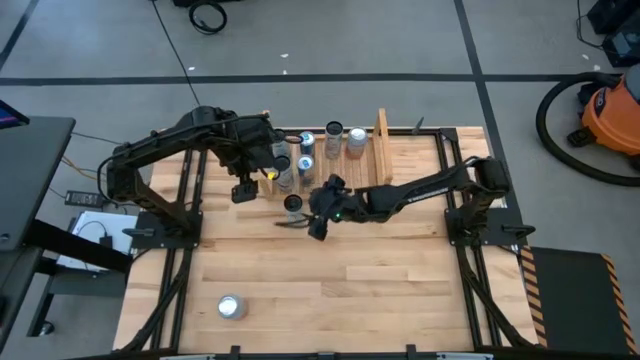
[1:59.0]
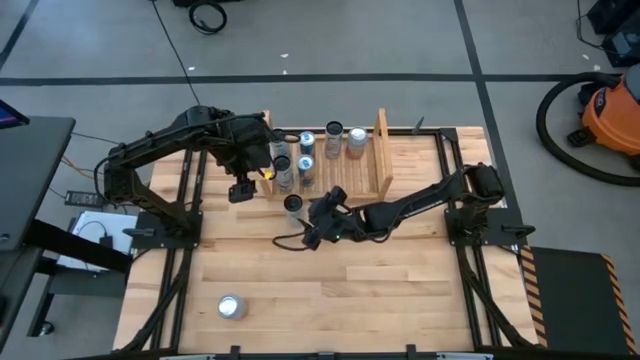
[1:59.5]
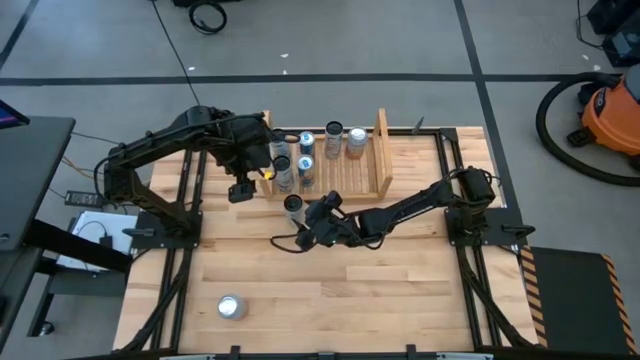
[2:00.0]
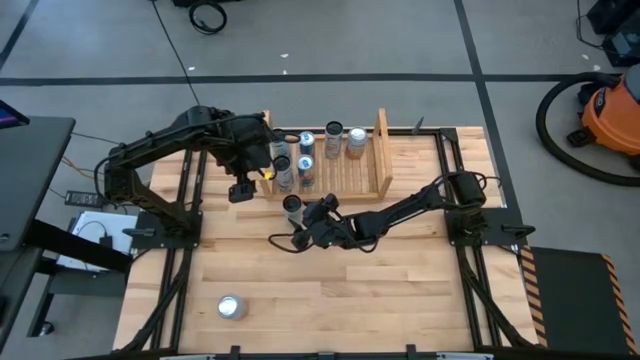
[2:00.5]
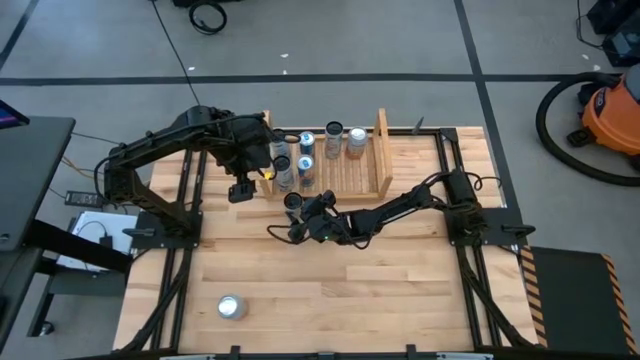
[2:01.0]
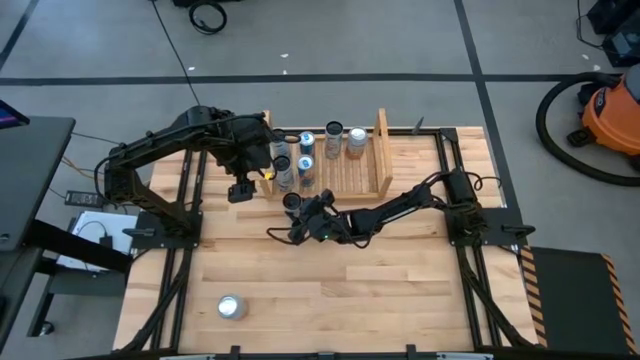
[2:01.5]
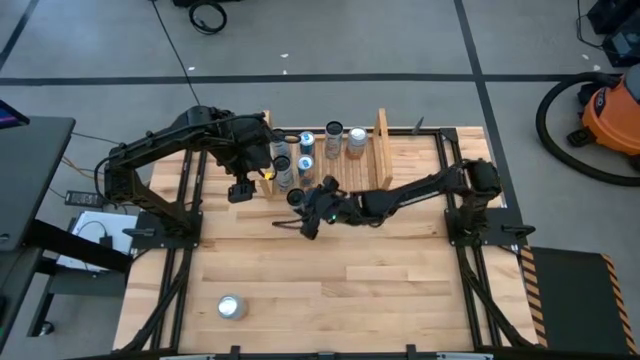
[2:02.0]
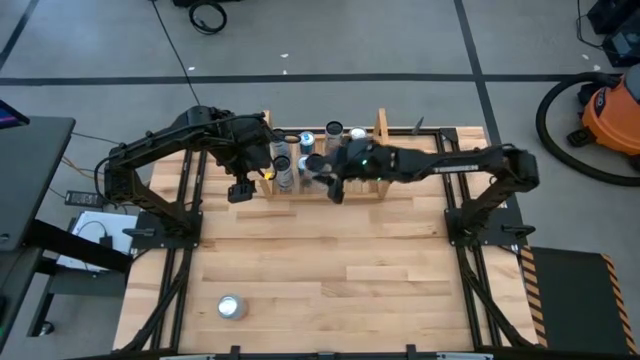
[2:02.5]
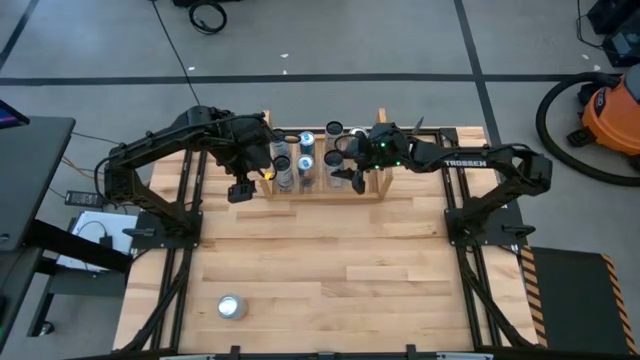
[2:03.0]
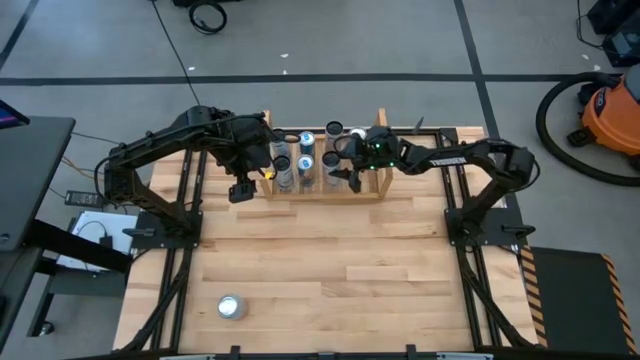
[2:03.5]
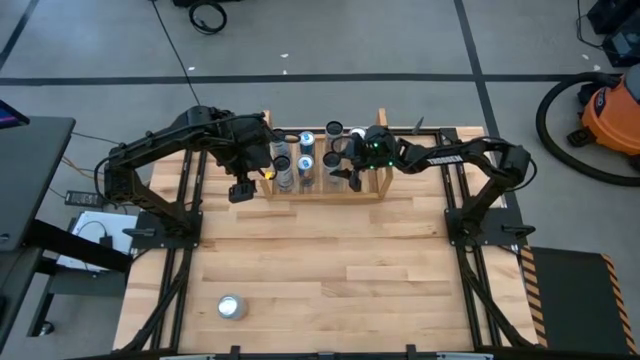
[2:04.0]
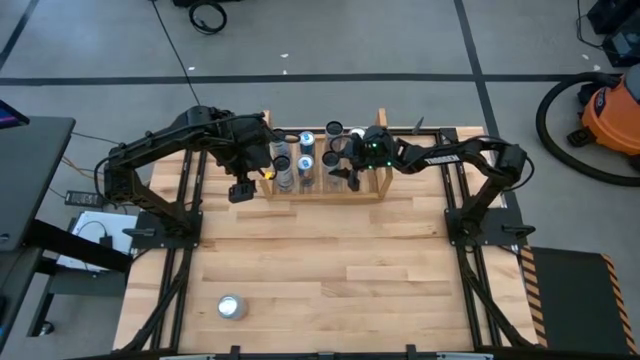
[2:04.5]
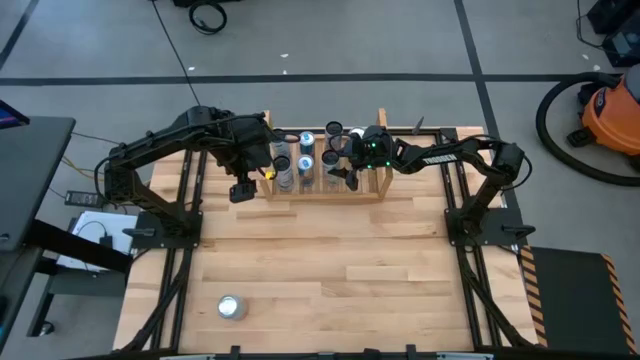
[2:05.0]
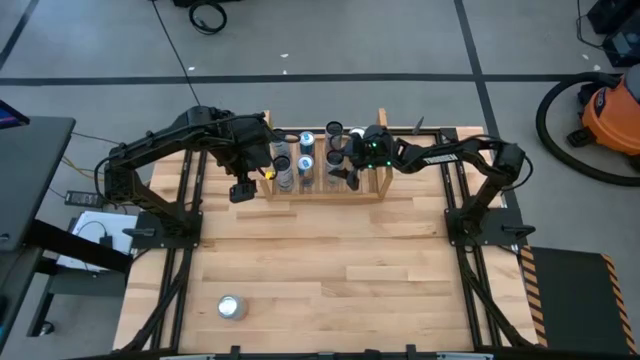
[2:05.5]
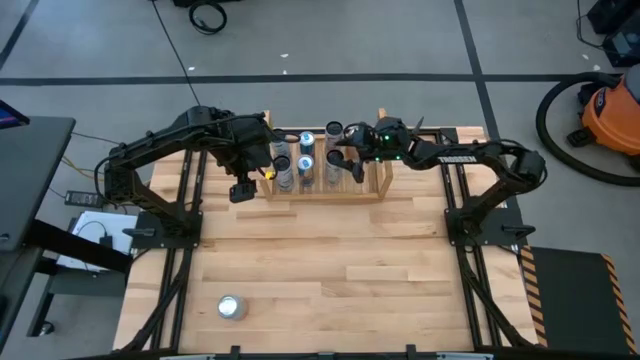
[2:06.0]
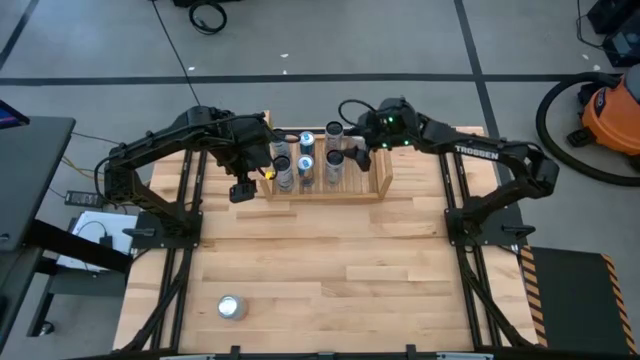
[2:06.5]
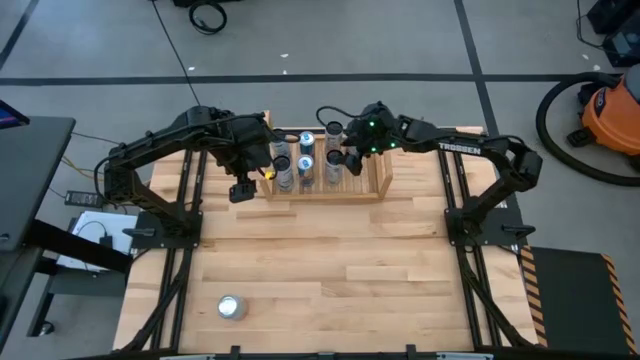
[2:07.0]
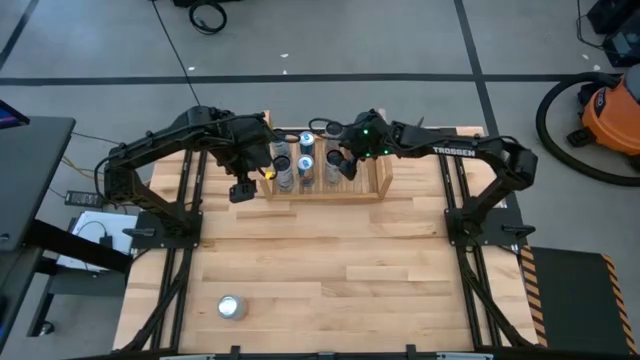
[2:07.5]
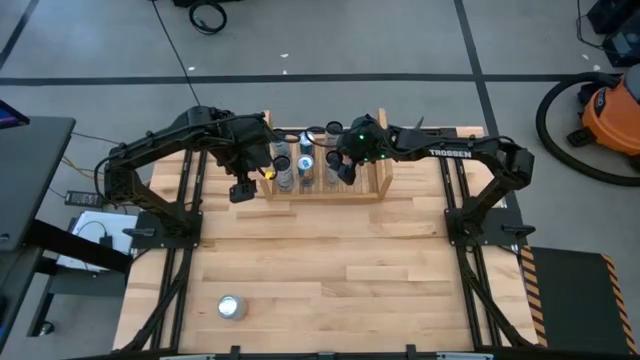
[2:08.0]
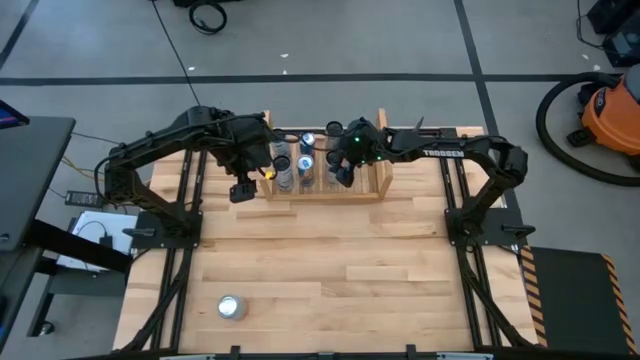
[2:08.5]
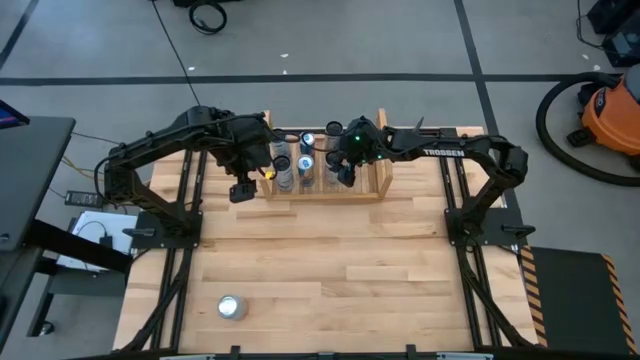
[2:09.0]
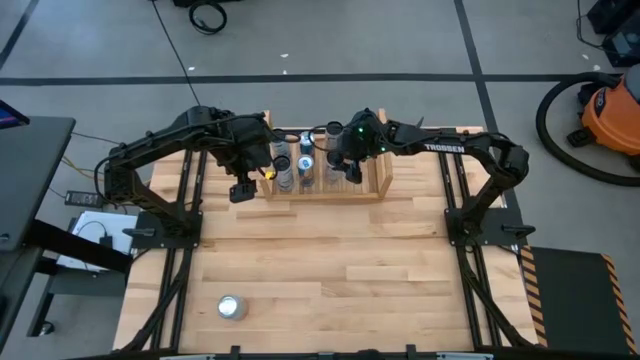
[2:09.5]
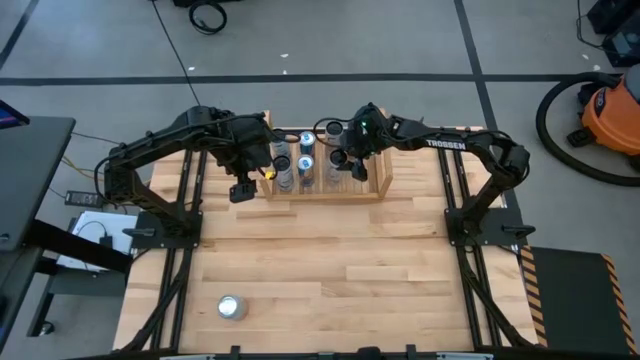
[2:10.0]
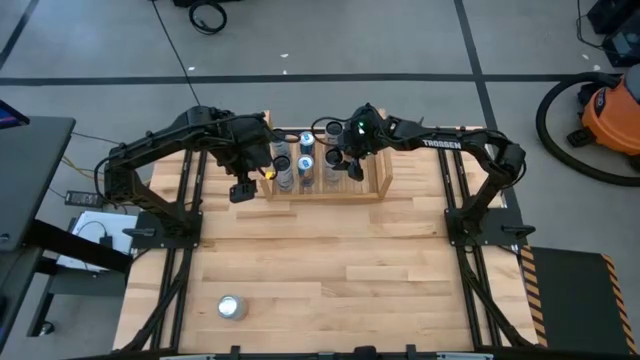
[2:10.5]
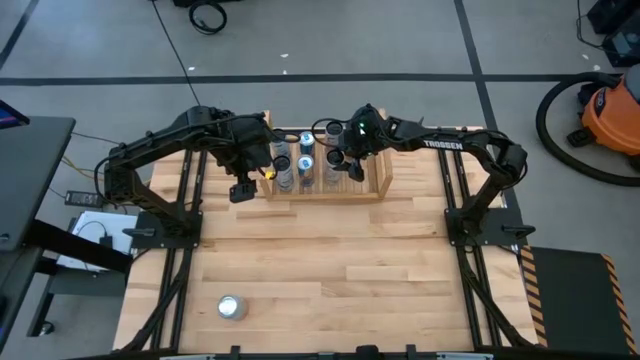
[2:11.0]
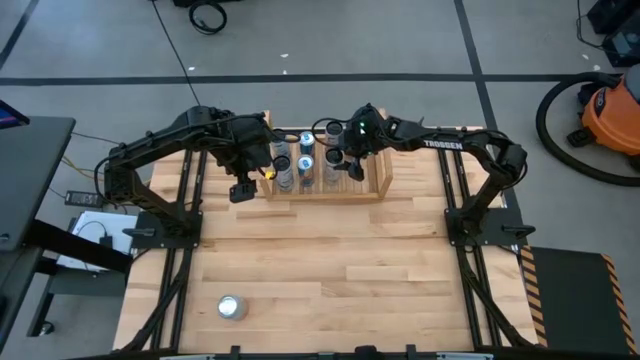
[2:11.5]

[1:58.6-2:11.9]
Task: Place canned beverage on shelf
Put the white-pink soda can on the shelf aligned with the other white-pink soda can

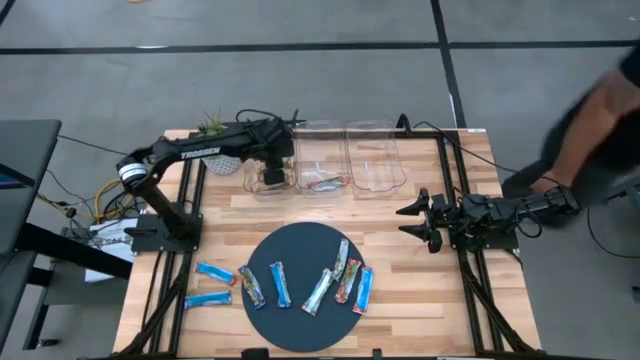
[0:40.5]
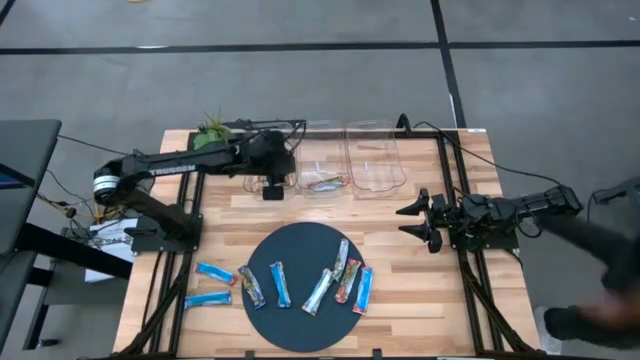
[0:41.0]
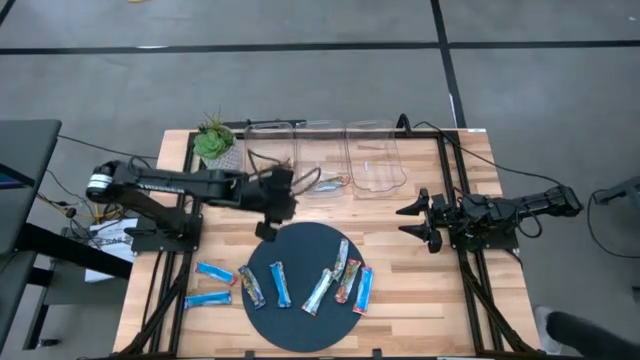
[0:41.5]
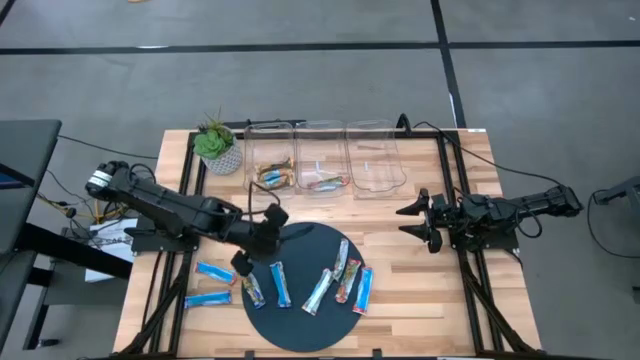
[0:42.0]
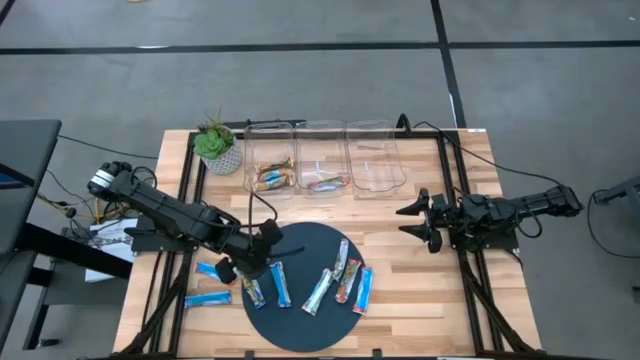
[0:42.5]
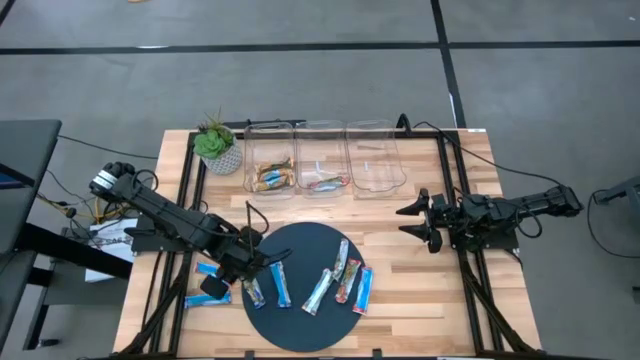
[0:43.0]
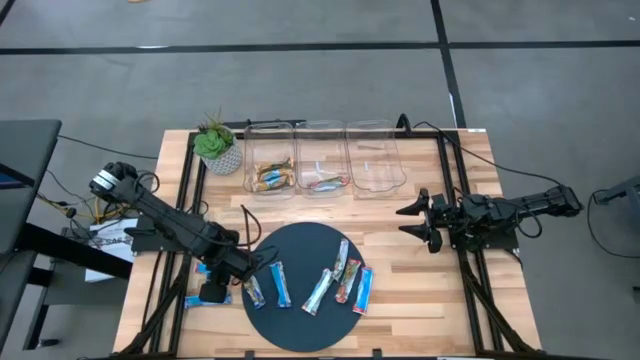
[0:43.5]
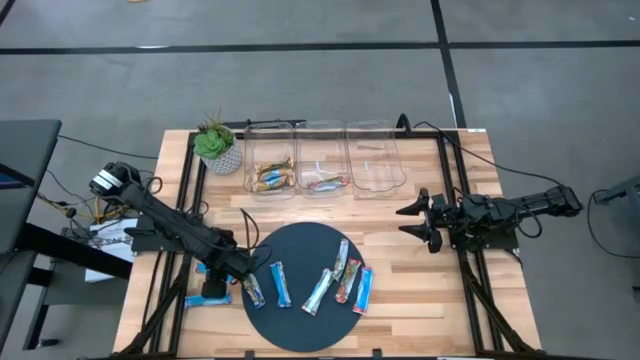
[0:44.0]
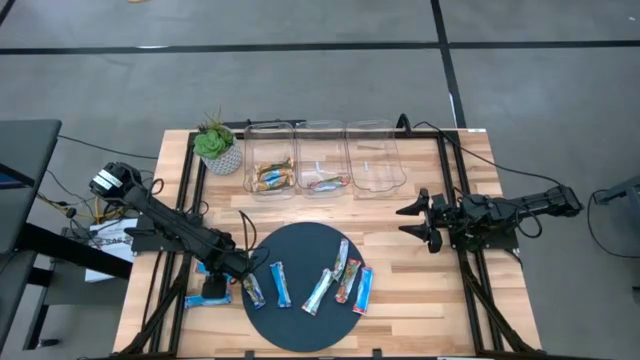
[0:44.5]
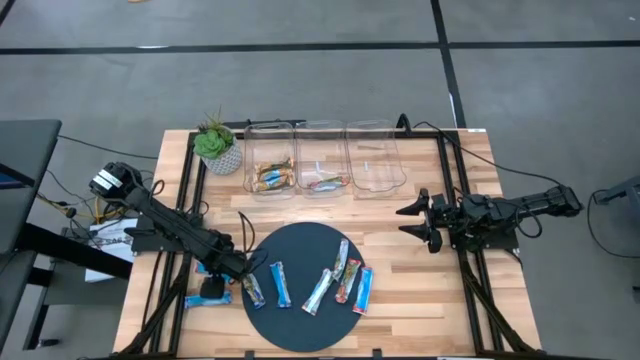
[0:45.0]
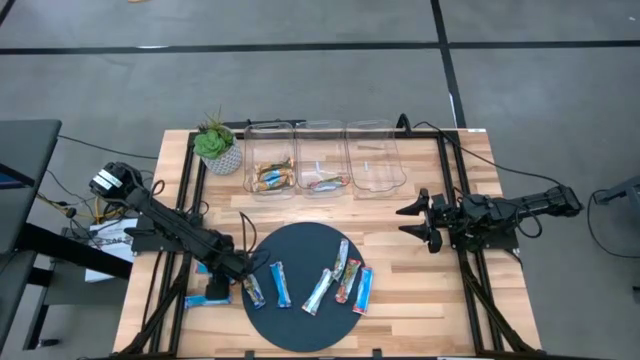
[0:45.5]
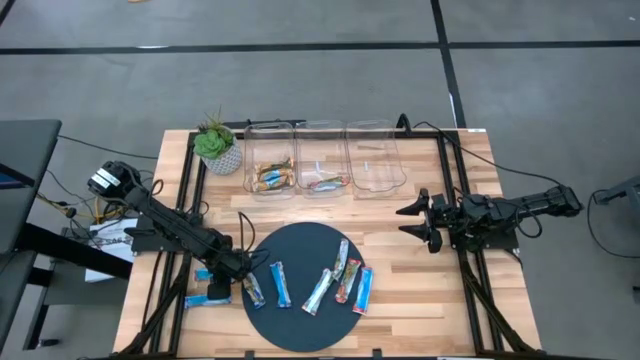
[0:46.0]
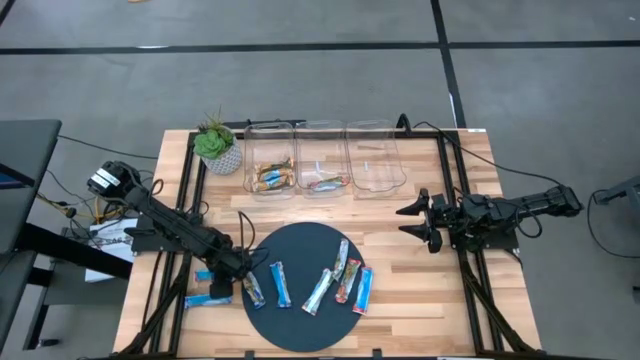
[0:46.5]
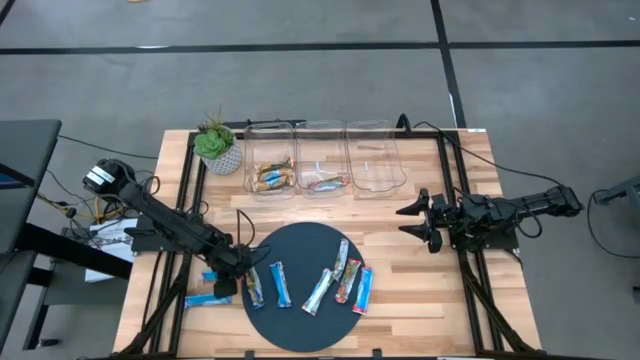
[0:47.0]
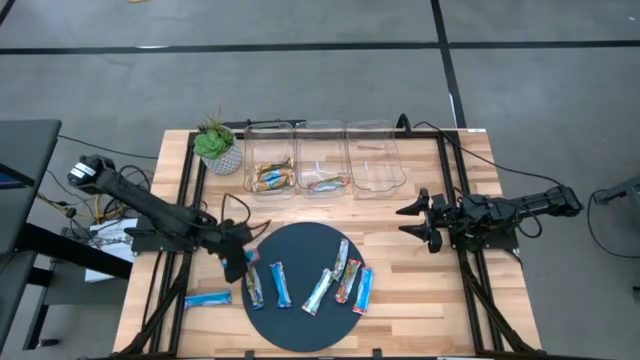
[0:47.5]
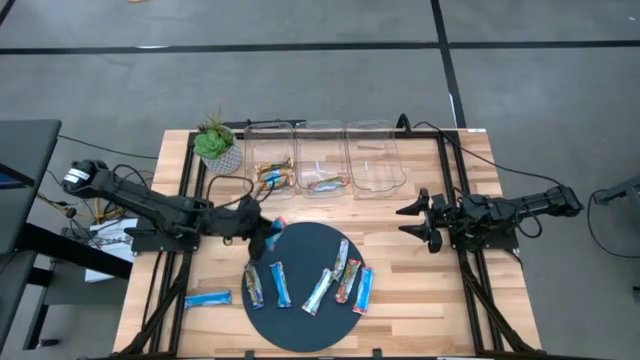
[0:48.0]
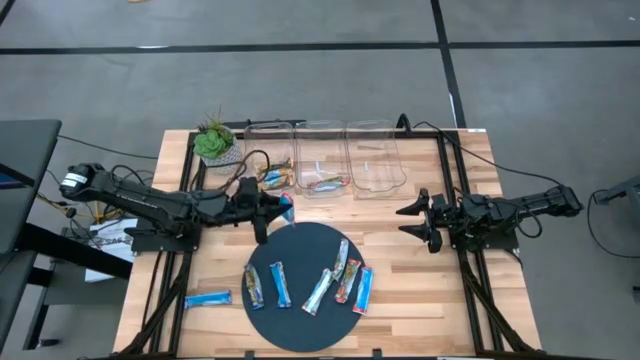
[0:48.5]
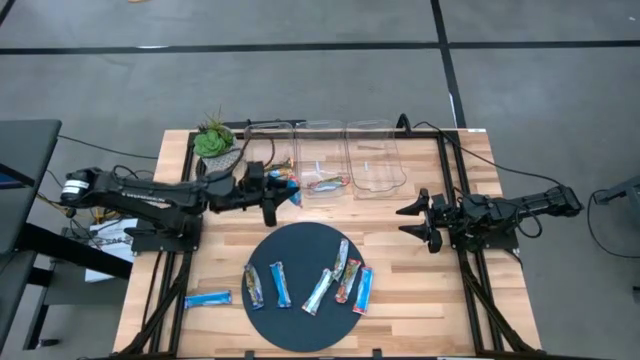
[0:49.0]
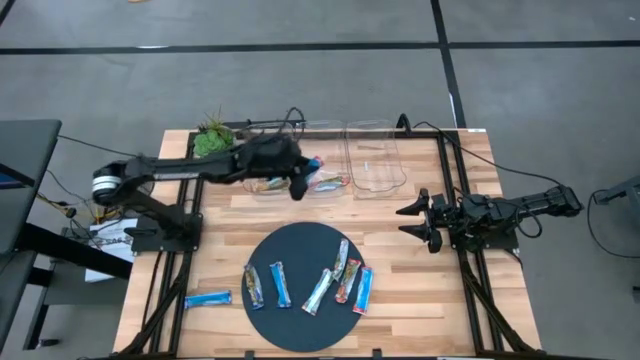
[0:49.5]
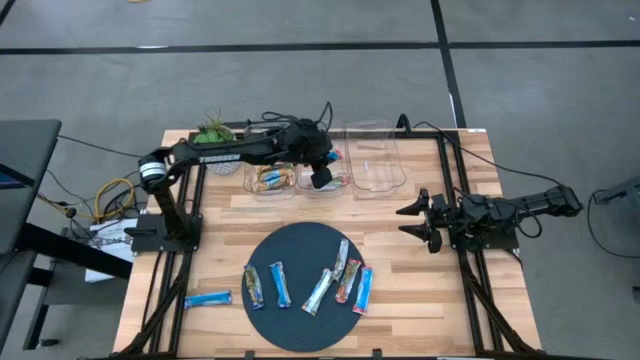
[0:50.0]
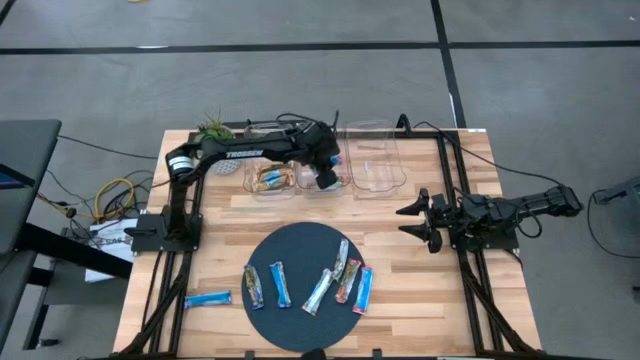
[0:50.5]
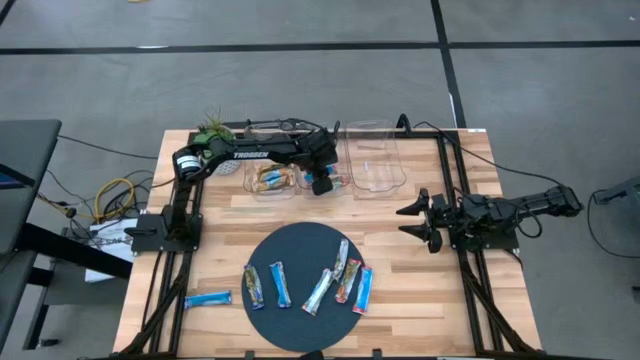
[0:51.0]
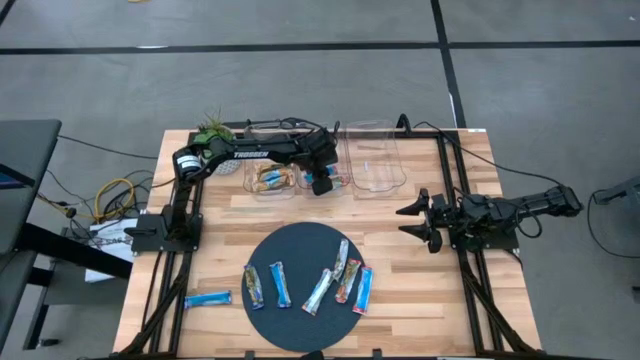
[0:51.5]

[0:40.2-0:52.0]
Task: Pick and place Granola Bars by type
Put the red bar into the center transparent bin
